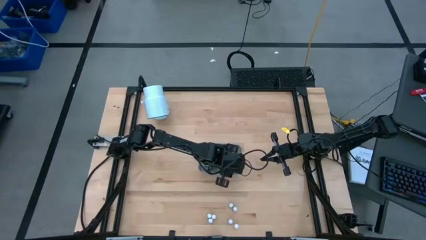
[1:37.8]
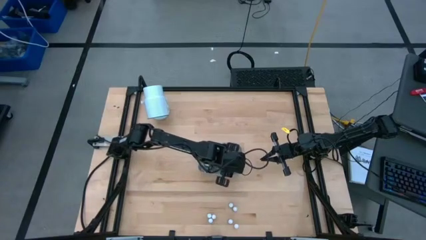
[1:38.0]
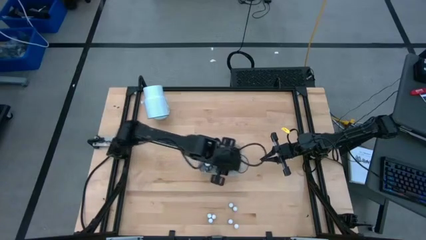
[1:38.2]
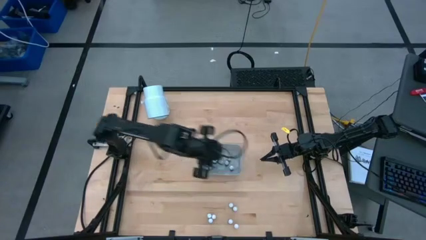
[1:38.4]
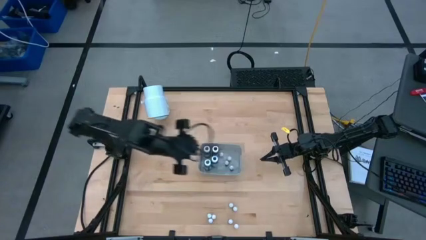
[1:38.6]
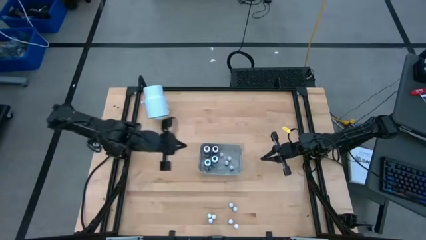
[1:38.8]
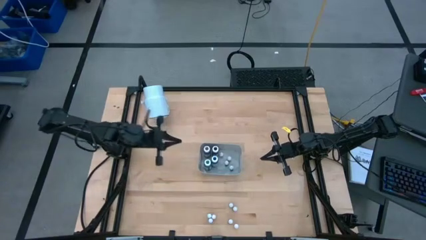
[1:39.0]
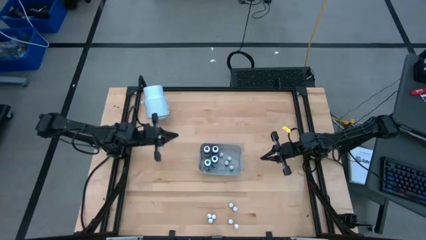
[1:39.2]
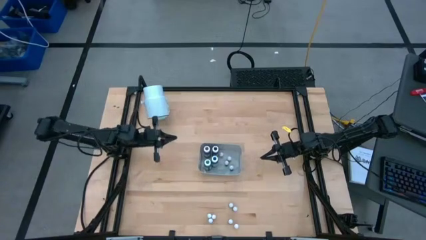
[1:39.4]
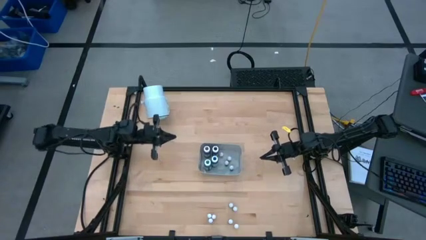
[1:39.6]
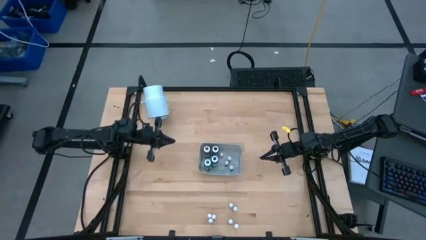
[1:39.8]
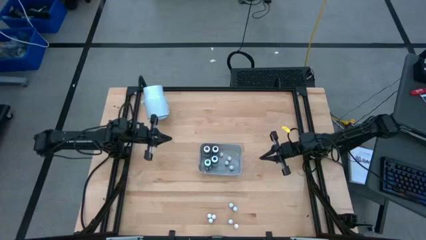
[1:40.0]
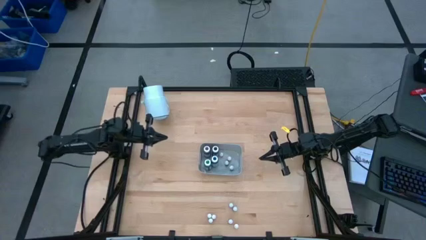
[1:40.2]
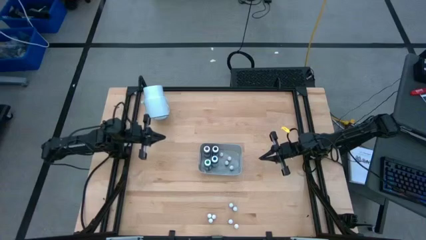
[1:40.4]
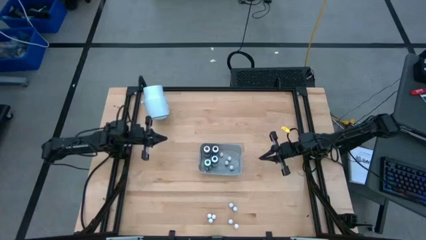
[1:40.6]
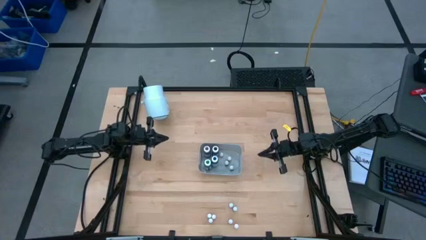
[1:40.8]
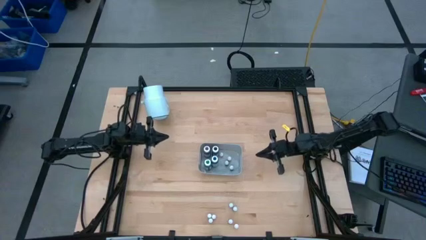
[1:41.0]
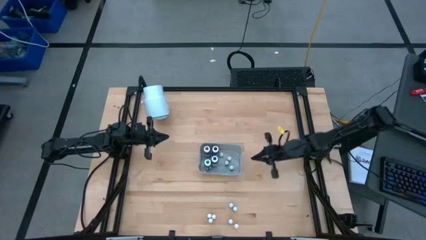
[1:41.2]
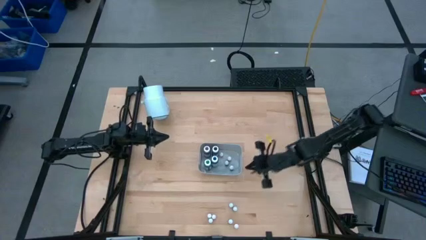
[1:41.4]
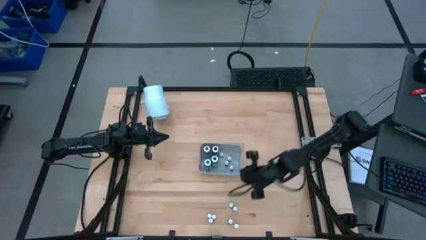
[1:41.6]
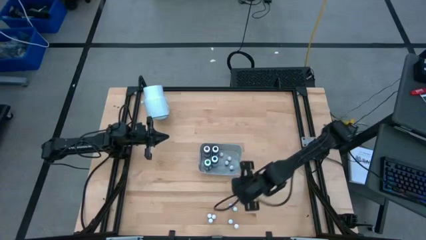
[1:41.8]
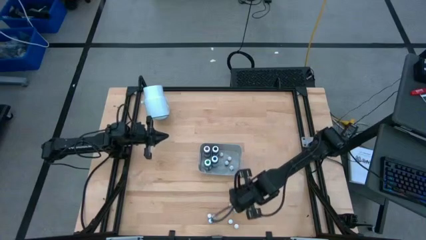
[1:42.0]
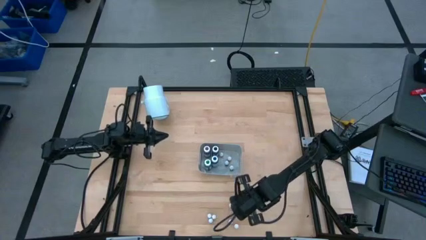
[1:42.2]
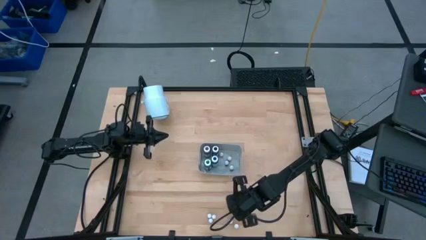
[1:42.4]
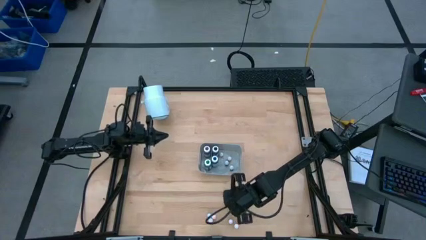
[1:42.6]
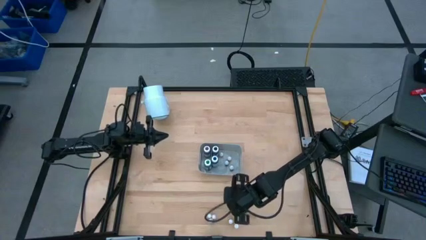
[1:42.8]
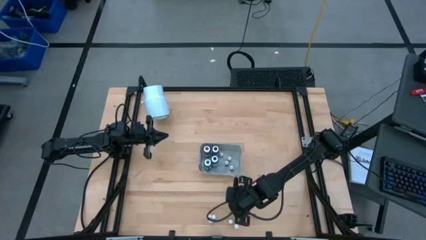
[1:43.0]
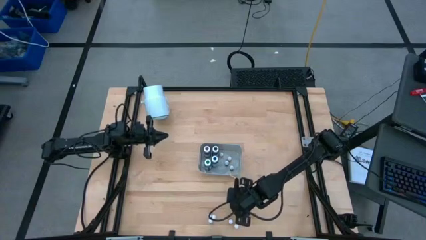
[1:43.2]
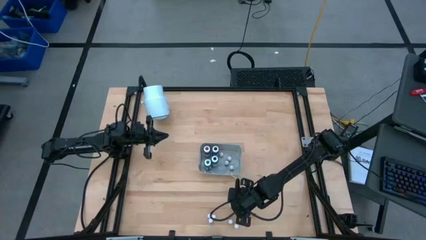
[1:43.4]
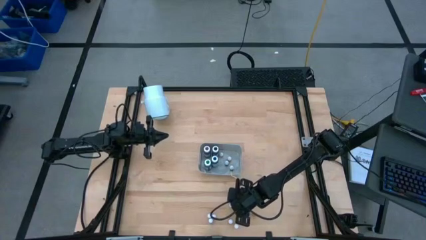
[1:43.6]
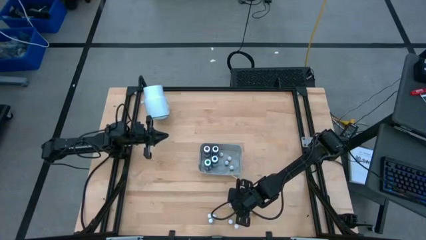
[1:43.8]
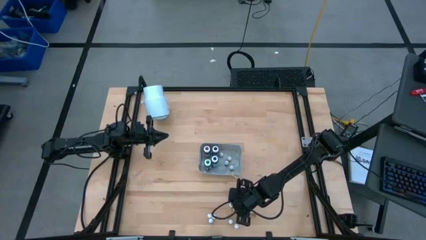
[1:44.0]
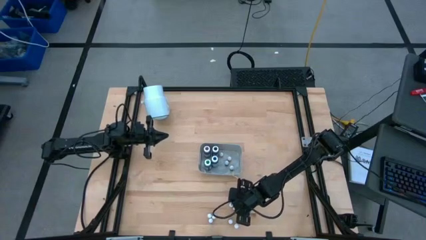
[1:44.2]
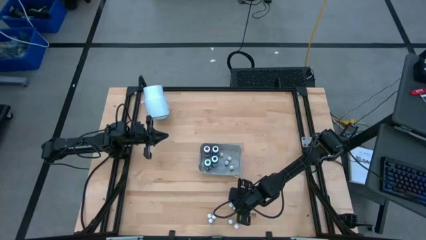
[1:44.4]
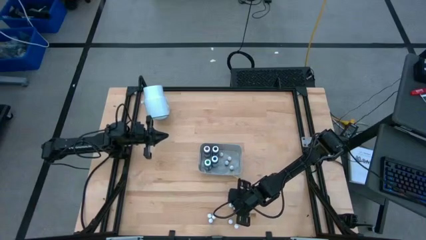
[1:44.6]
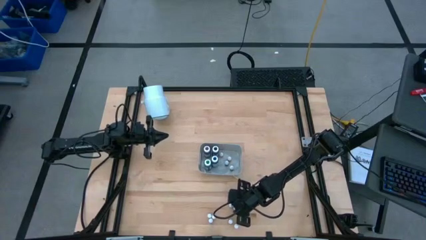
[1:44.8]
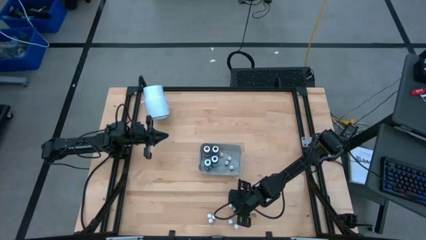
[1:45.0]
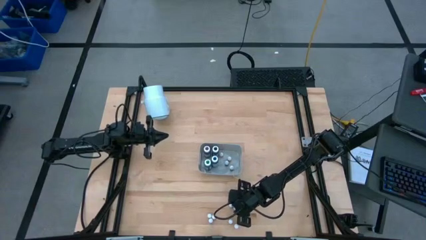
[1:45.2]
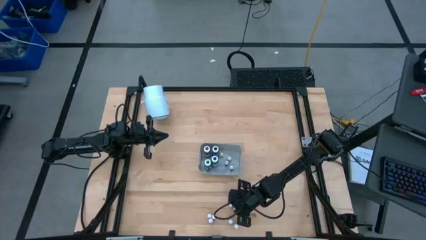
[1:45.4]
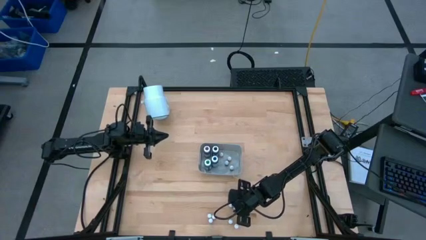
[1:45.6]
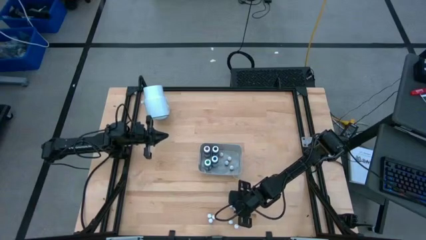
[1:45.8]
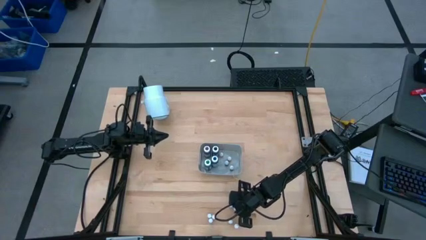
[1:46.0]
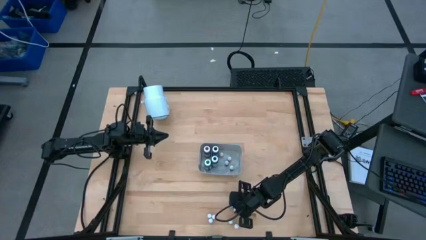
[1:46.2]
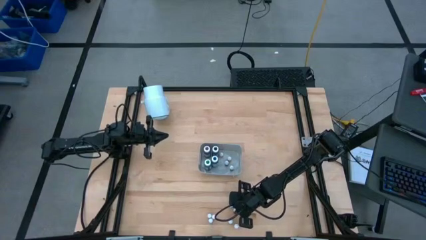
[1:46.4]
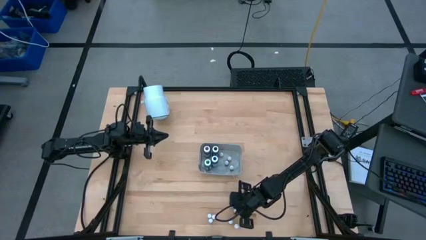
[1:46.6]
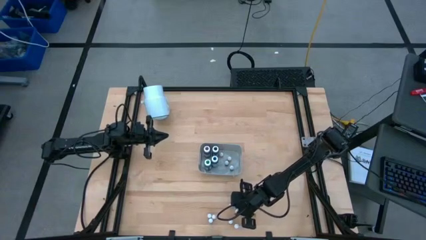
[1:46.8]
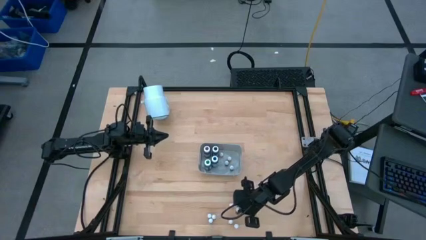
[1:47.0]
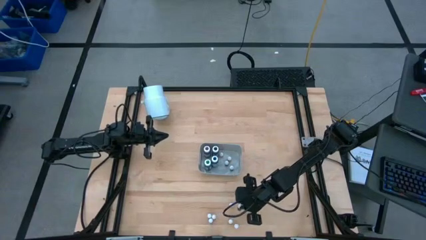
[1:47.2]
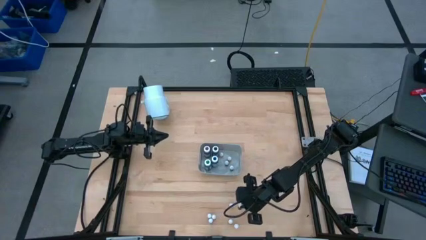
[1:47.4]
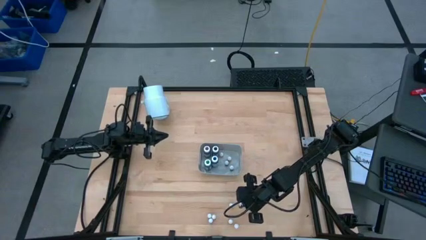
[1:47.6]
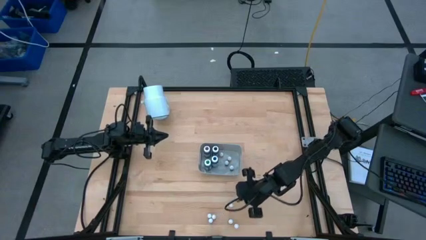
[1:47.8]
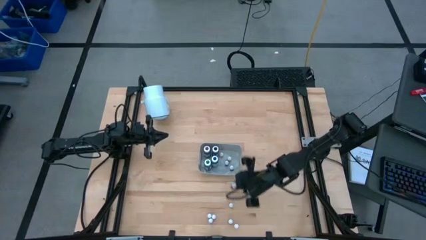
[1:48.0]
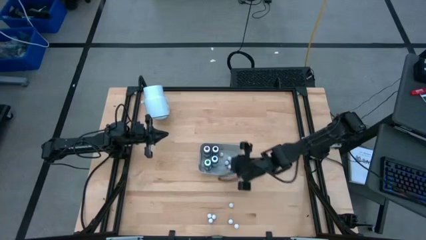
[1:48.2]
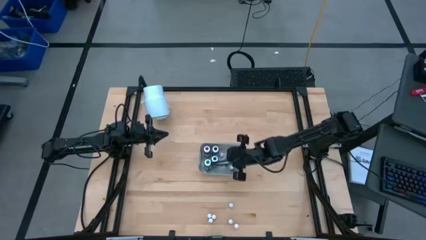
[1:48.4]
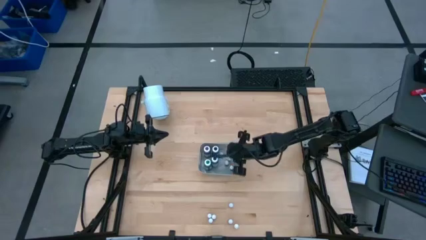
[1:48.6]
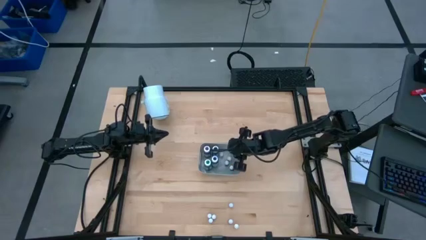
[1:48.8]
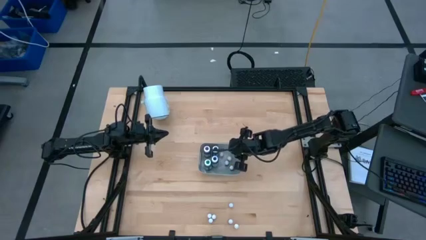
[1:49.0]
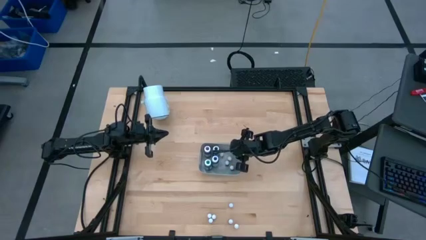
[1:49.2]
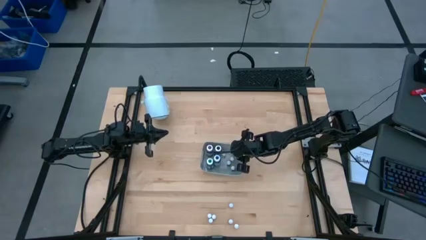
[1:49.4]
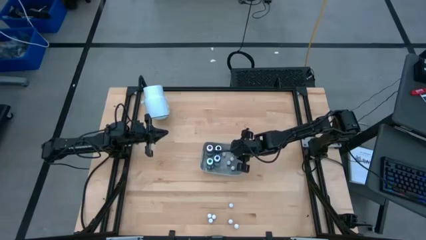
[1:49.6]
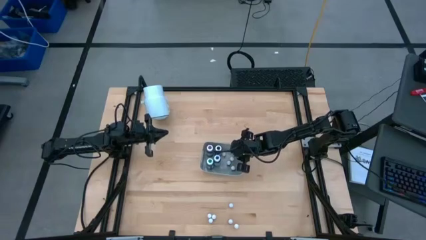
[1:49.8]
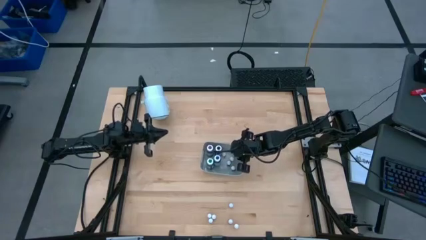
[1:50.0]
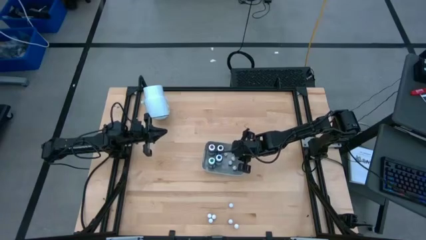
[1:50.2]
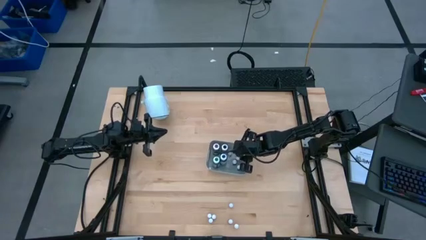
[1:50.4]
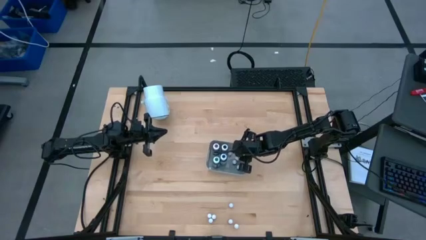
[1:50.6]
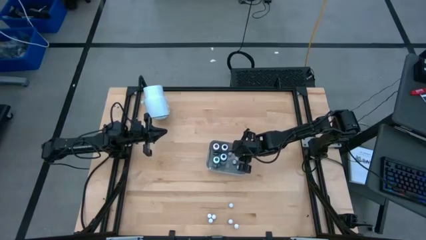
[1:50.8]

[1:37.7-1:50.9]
Task: Pick & Place food coloring
Put the small black food coloring bottle into the bin
